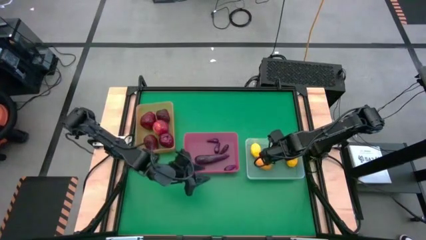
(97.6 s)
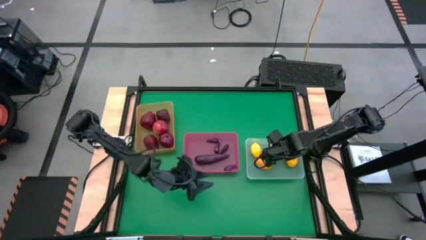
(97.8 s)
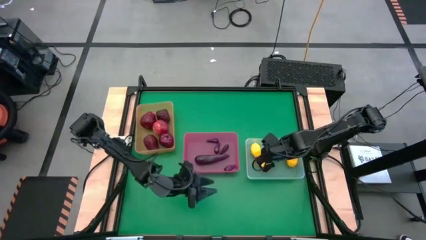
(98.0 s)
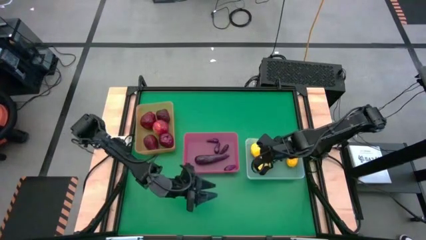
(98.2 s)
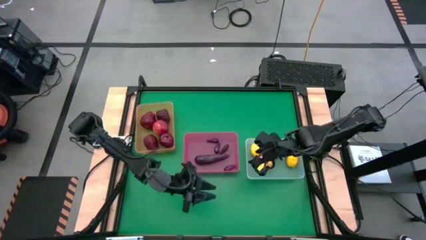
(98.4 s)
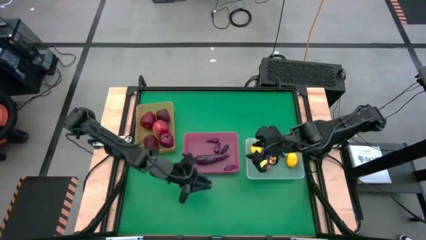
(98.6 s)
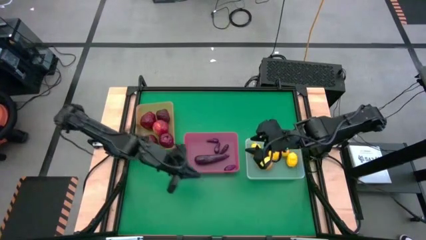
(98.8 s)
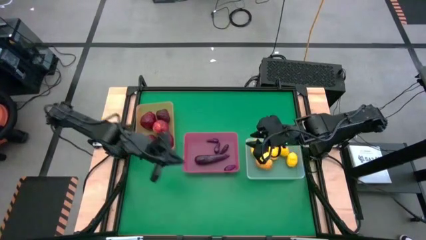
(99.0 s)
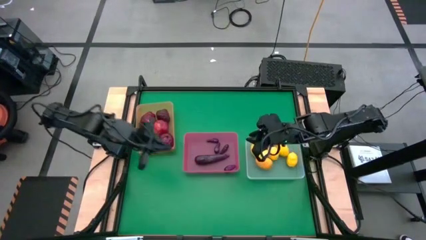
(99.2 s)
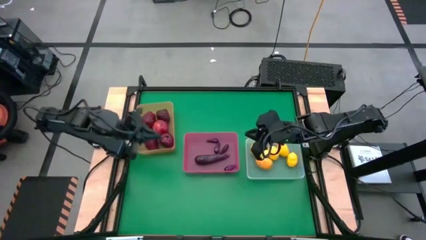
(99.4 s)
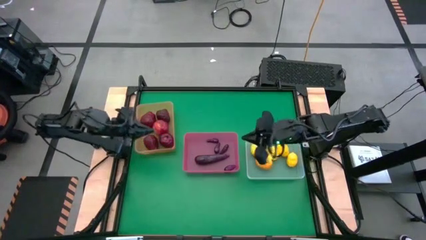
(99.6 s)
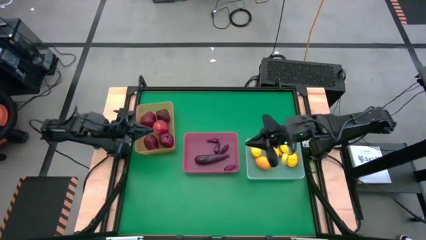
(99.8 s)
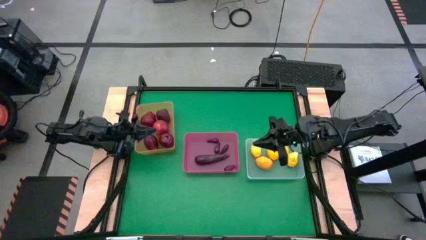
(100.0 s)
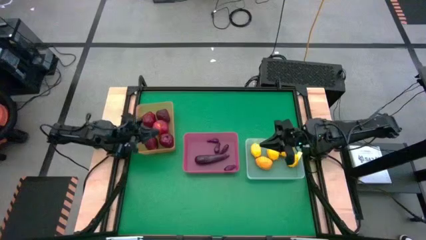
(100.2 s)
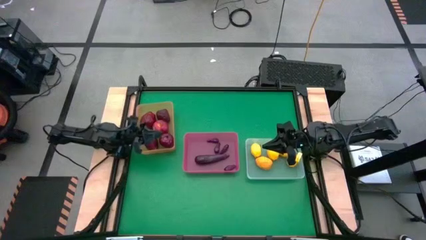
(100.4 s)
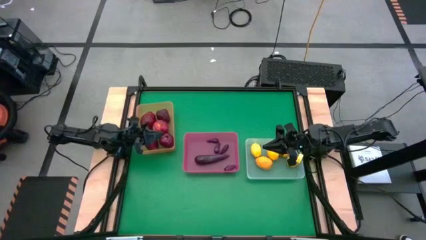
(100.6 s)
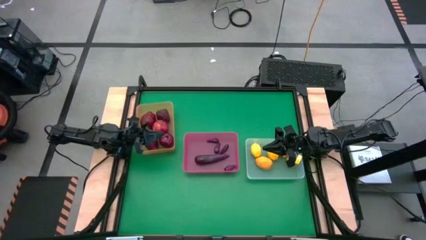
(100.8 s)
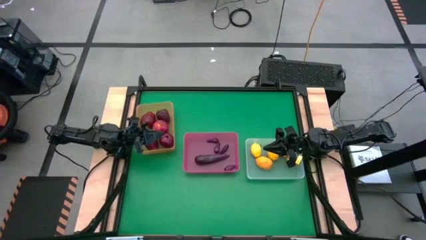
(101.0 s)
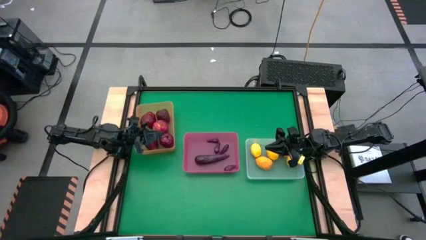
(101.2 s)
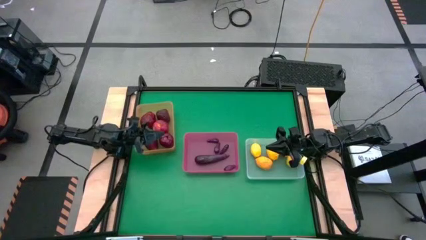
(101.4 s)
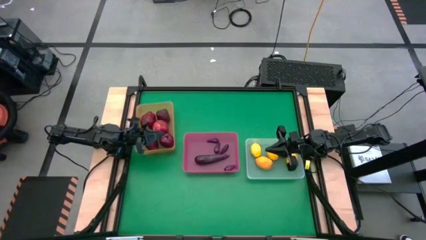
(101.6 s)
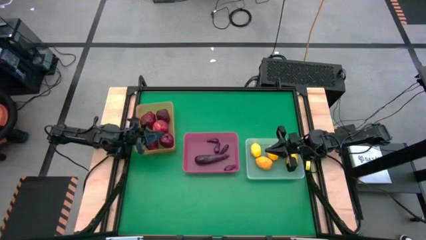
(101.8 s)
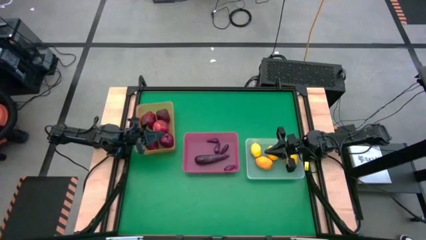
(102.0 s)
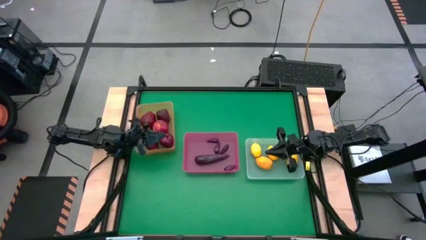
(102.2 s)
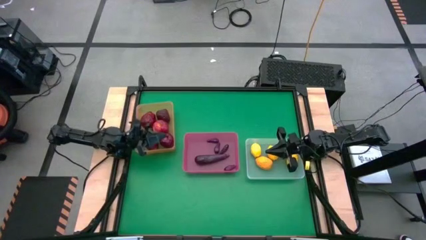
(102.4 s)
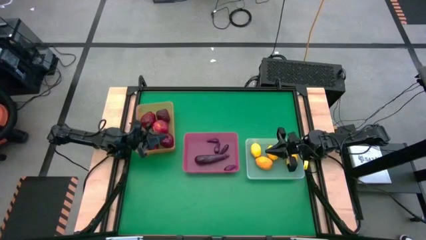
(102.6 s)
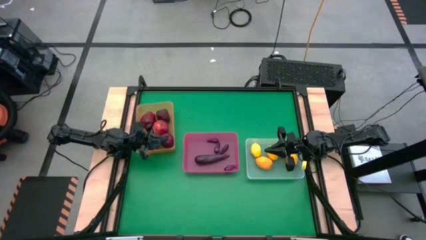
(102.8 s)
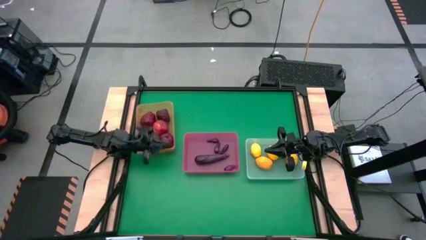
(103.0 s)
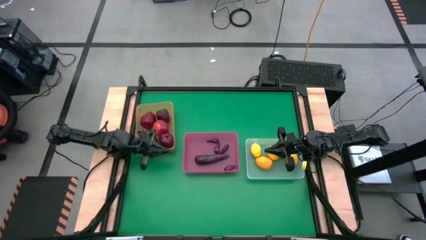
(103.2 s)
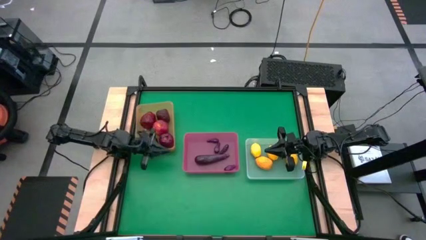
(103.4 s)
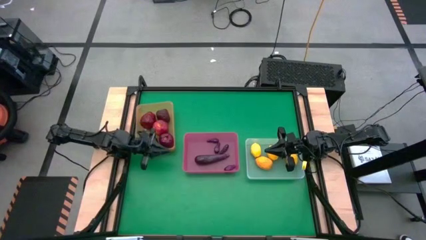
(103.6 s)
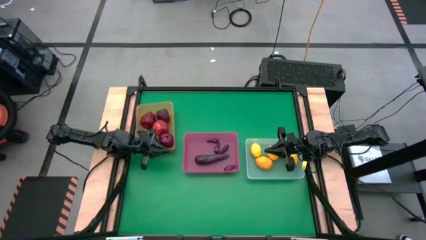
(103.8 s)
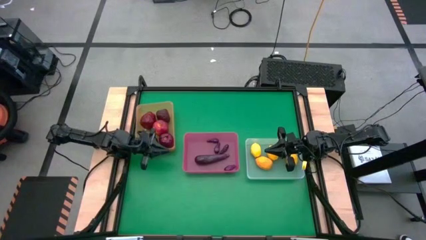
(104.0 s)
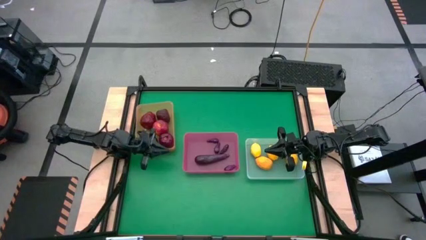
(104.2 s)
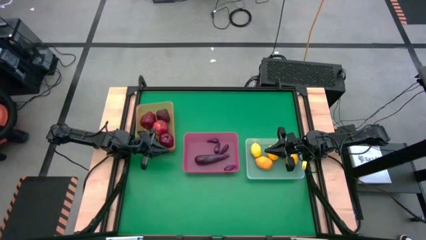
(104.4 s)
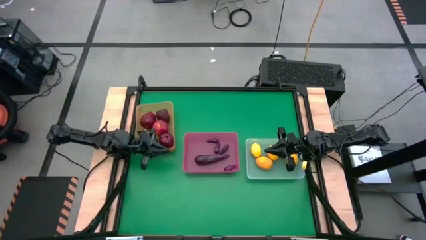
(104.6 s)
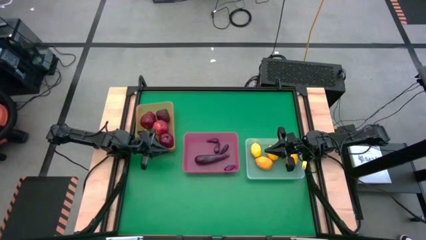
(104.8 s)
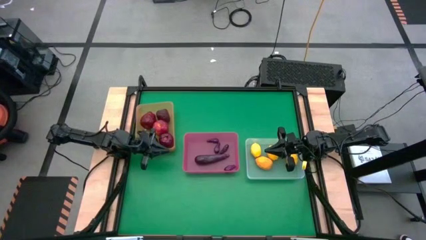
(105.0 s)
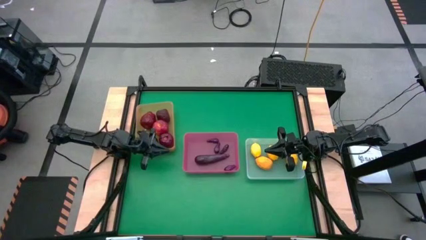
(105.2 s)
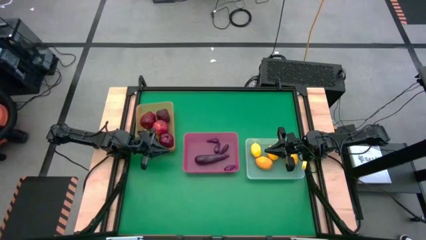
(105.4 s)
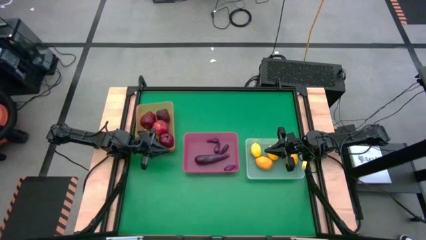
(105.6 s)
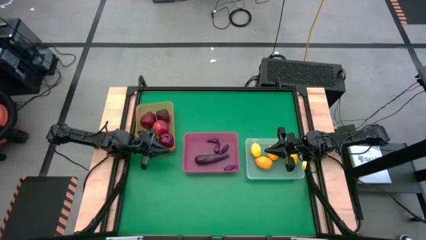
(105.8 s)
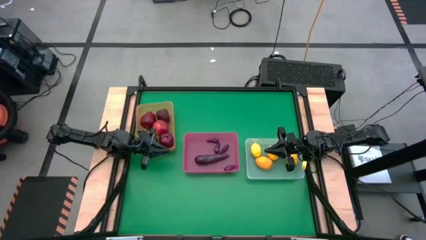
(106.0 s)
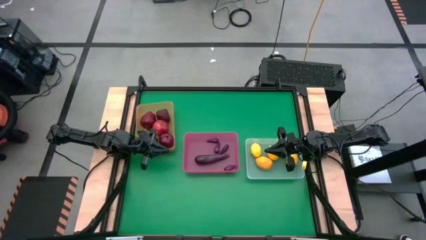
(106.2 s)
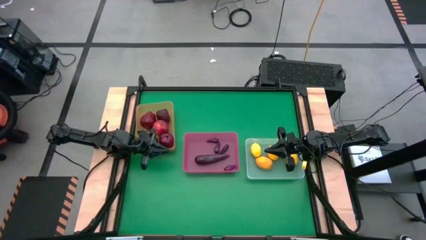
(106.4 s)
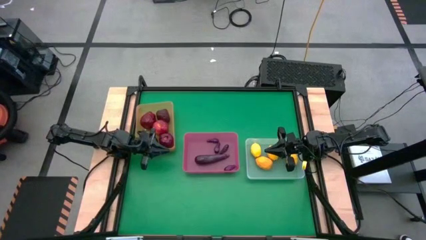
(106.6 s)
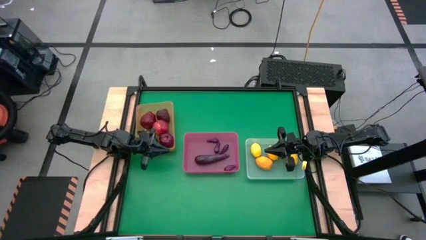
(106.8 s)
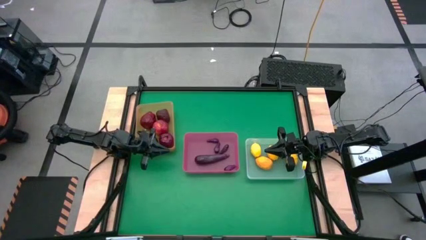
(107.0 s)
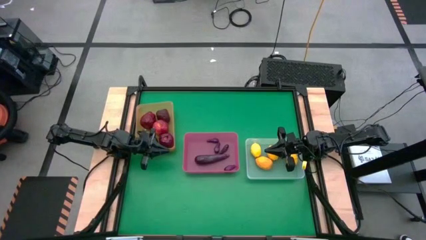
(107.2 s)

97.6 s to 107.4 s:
Task: Sort produce into baskets
Return to Home Position

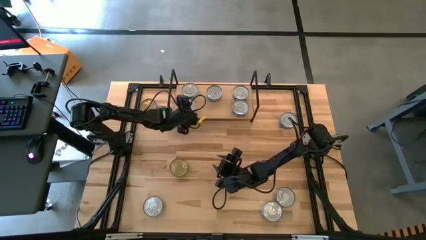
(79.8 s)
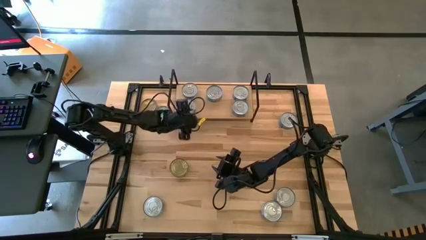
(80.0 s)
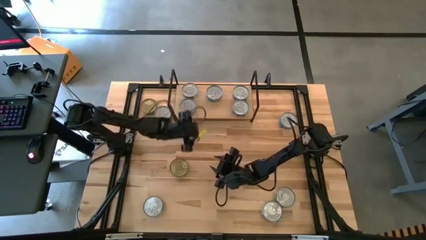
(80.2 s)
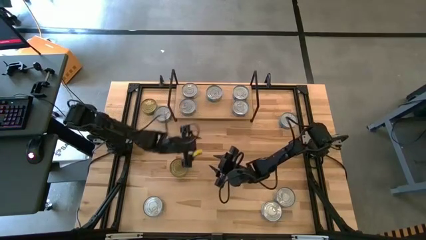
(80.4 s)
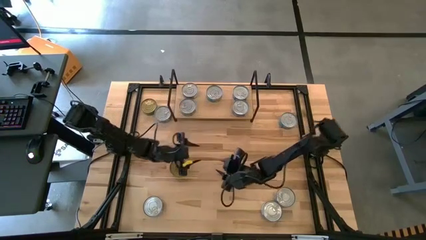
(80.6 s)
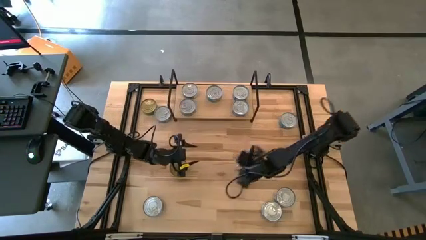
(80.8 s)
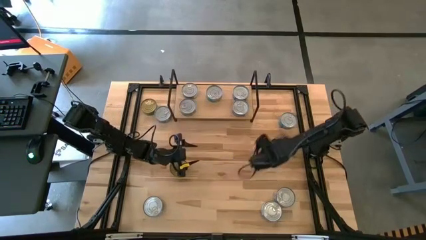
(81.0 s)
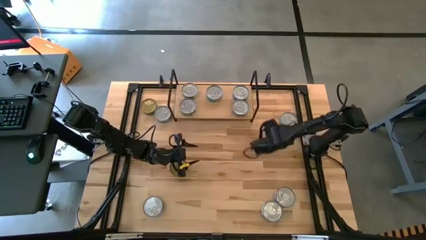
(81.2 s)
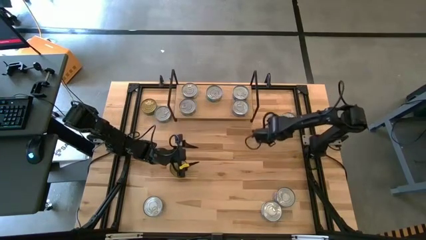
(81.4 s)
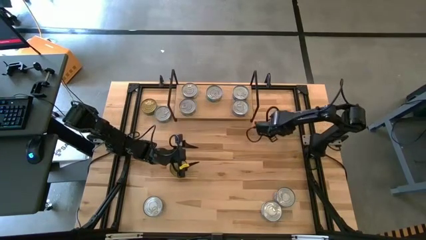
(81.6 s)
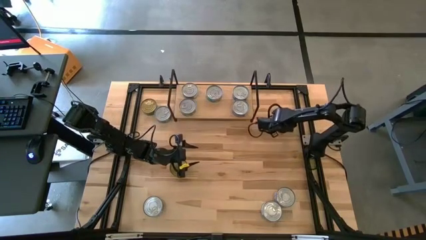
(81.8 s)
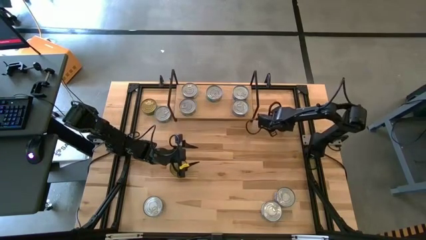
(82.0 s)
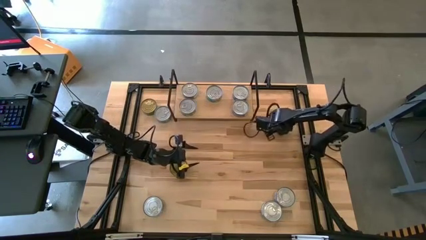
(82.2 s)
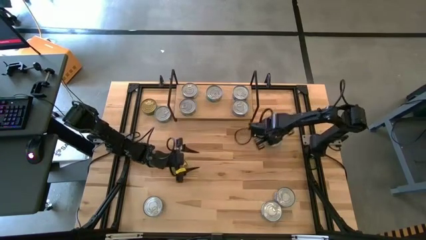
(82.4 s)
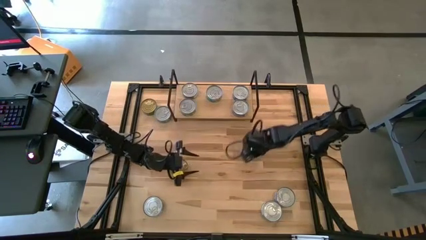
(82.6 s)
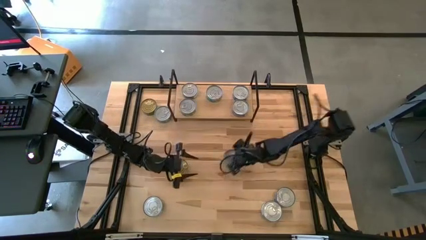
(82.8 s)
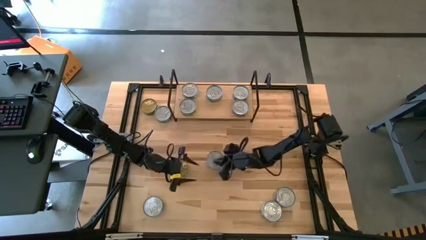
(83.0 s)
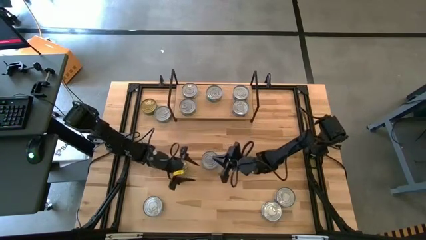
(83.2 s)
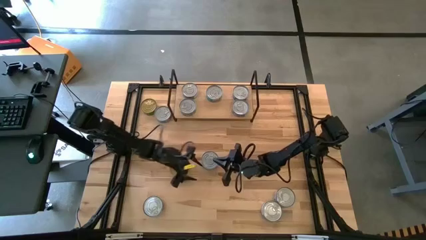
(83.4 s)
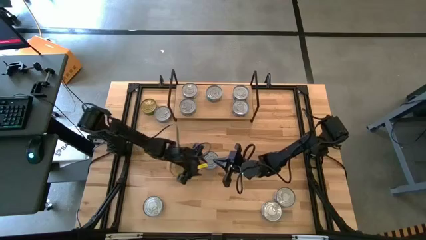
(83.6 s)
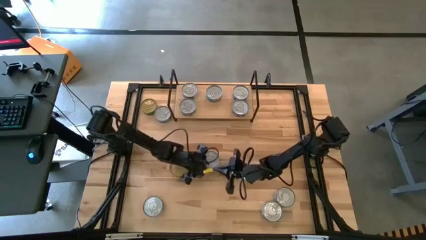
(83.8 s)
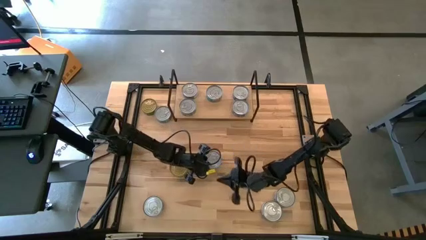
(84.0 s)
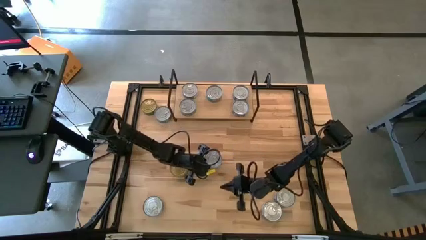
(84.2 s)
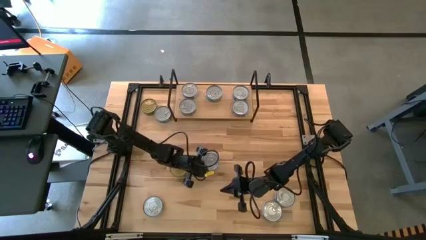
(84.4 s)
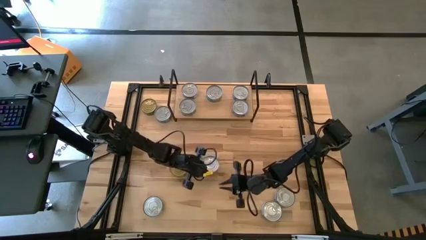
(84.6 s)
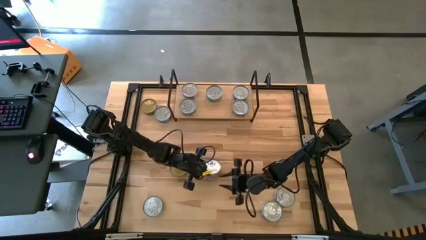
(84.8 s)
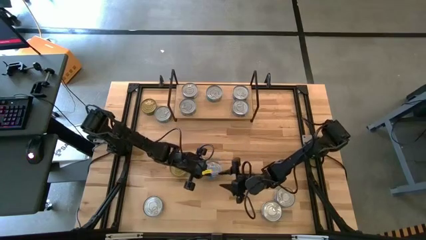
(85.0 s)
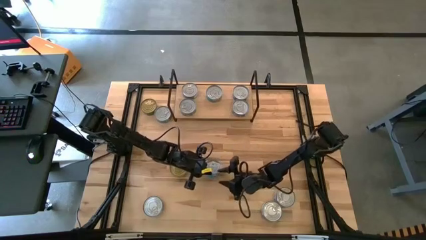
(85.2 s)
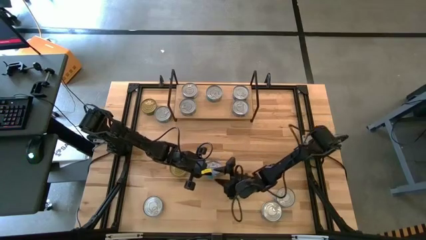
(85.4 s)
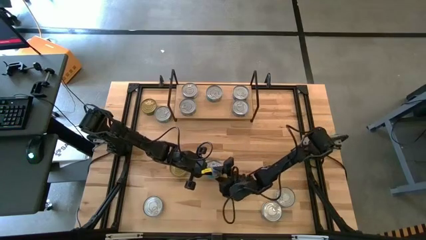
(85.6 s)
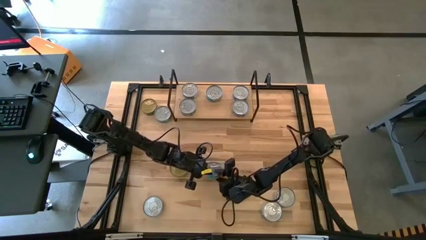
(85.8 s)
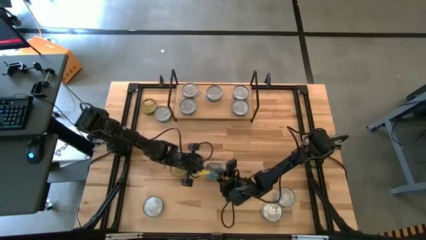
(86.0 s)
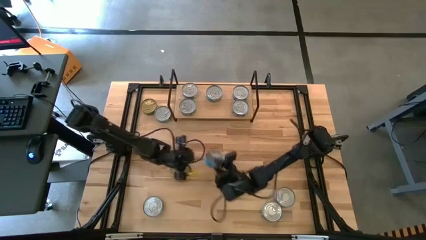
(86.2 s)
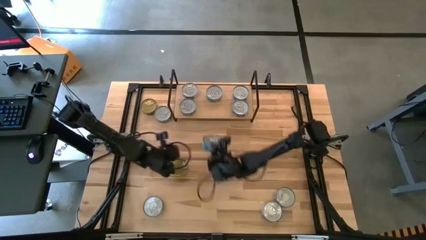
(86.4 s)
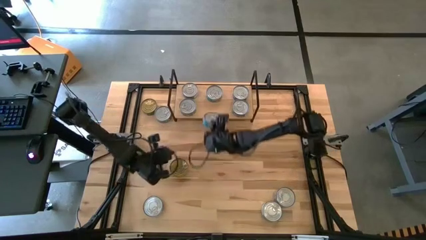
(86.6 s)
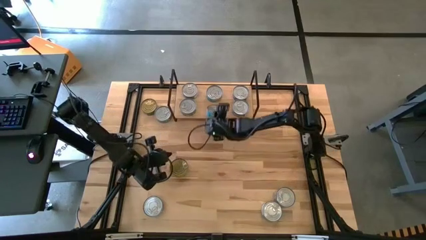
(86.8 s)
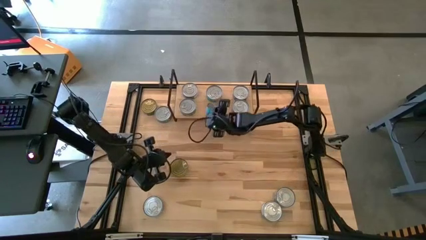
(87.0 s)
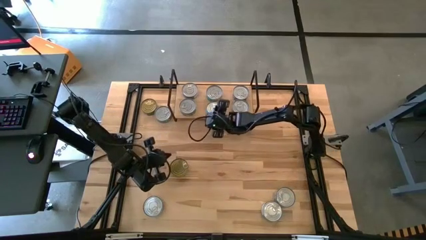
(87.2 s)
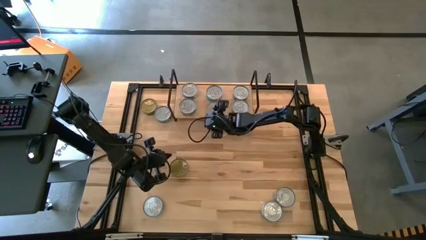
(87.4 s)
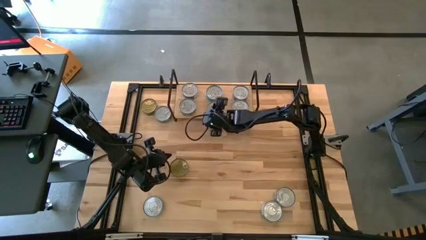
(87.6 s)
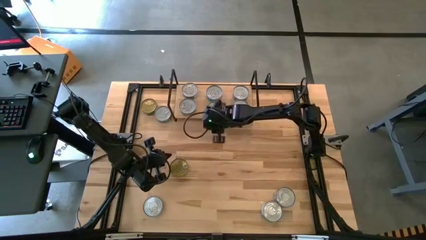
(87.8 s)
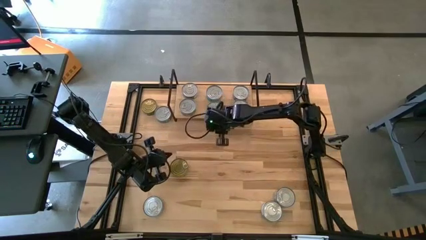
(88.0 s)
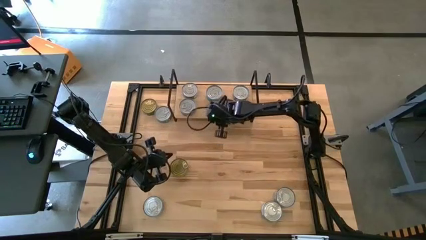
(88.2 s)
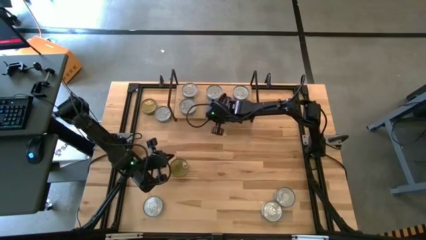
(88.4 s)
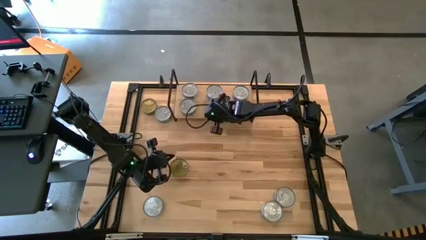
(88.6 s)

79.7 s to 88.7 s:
Task: Stack canned seafood by type on shelf
Put the yellow blue tuna can on the shelf aligned with the other yellow blue tuna can
